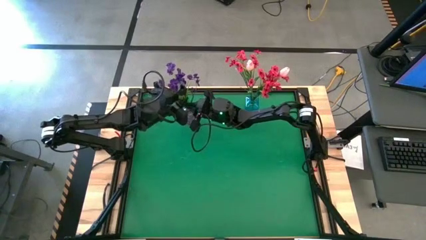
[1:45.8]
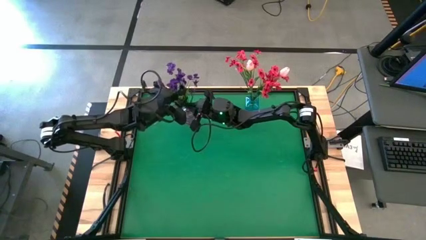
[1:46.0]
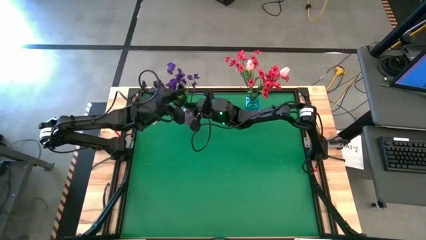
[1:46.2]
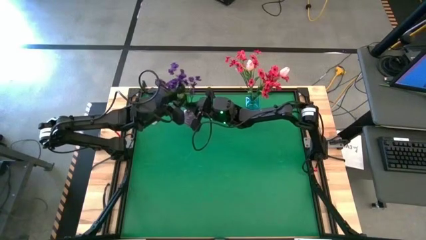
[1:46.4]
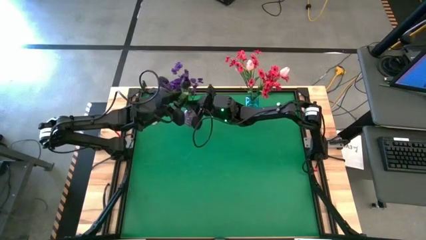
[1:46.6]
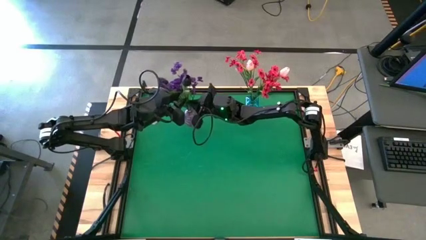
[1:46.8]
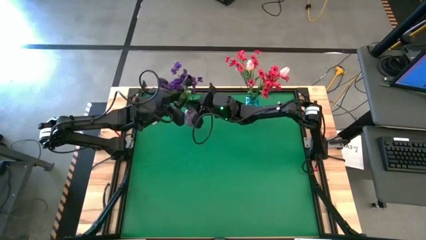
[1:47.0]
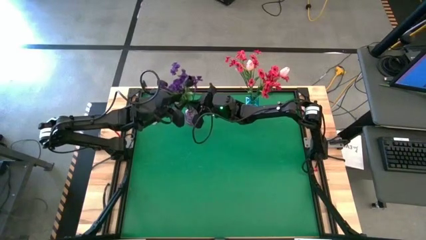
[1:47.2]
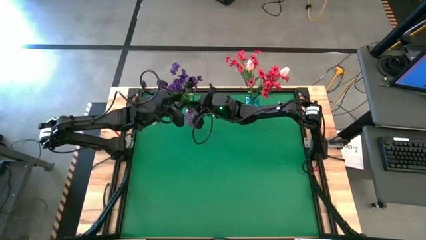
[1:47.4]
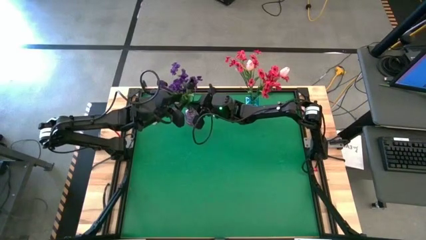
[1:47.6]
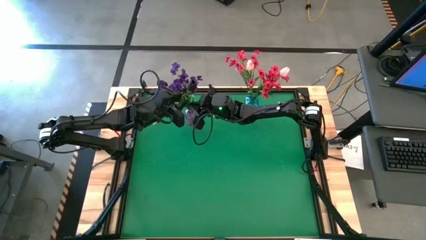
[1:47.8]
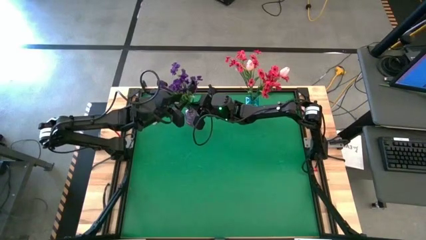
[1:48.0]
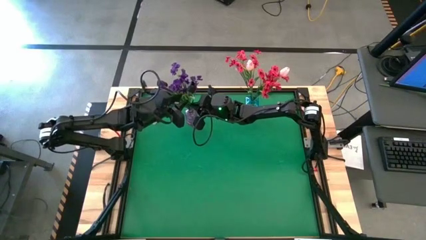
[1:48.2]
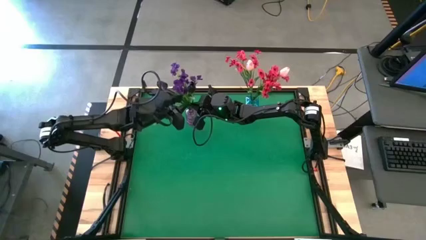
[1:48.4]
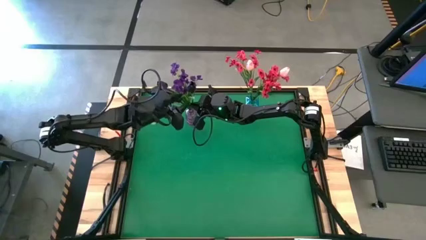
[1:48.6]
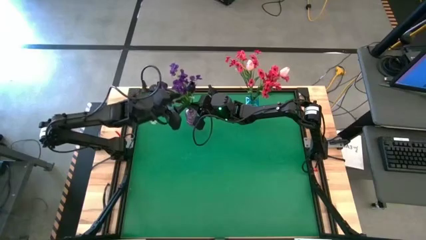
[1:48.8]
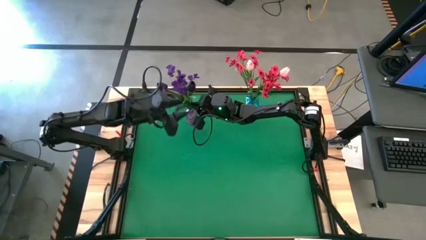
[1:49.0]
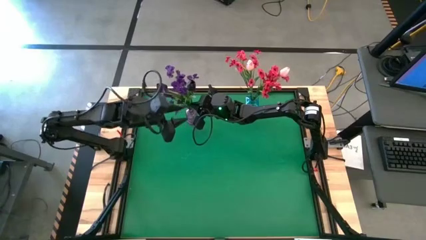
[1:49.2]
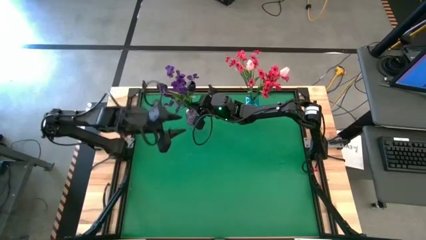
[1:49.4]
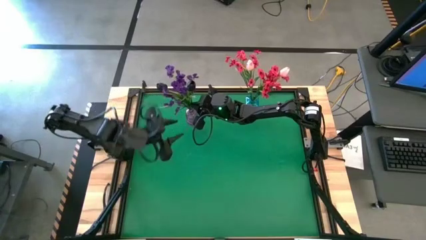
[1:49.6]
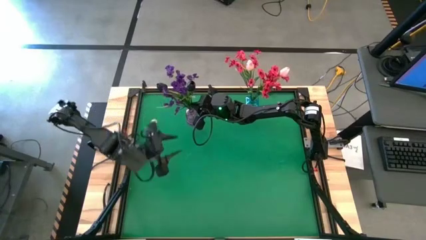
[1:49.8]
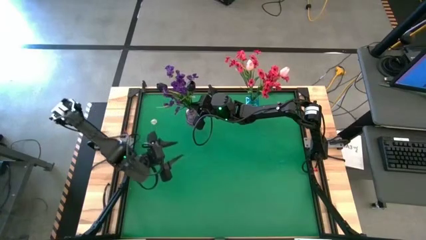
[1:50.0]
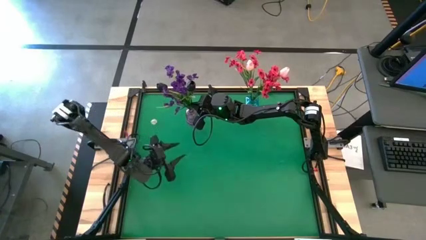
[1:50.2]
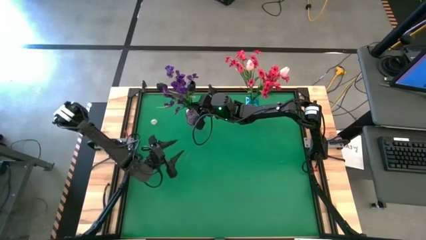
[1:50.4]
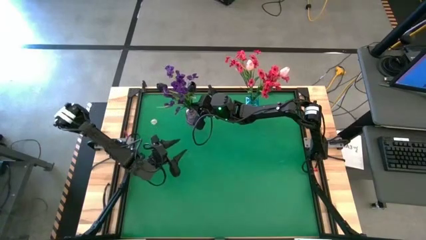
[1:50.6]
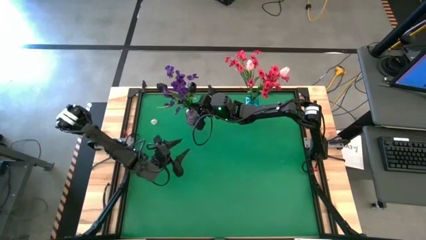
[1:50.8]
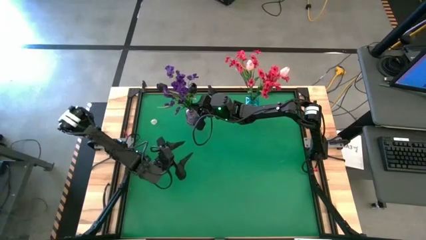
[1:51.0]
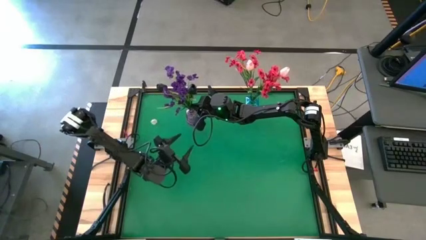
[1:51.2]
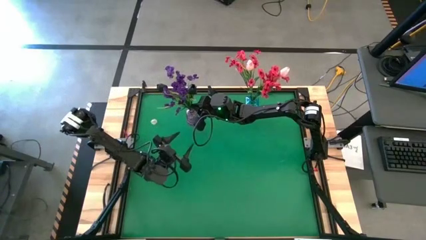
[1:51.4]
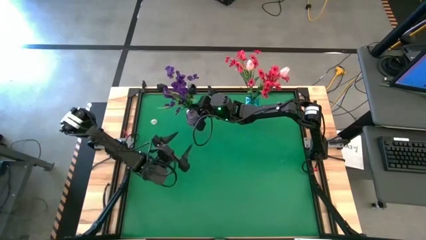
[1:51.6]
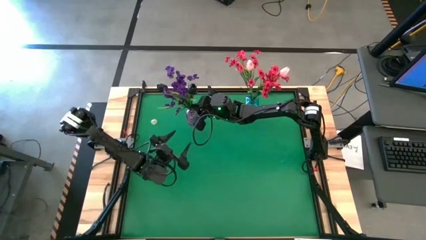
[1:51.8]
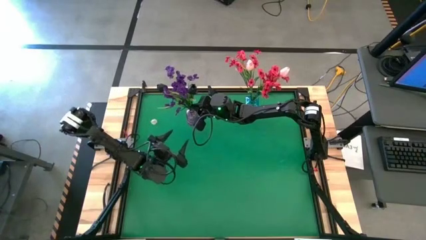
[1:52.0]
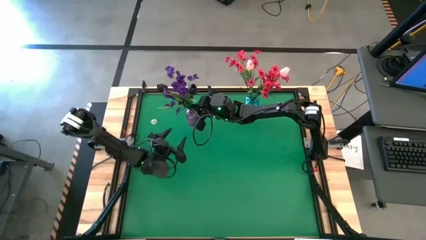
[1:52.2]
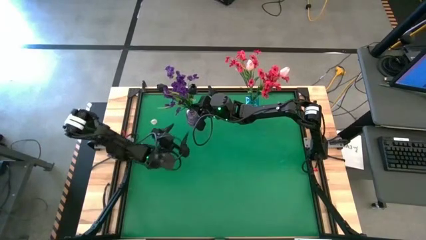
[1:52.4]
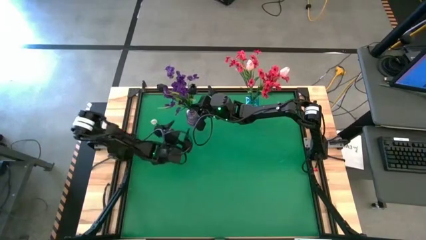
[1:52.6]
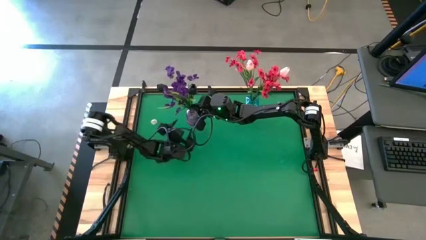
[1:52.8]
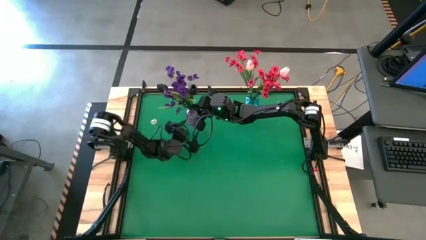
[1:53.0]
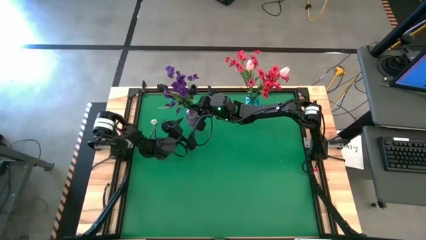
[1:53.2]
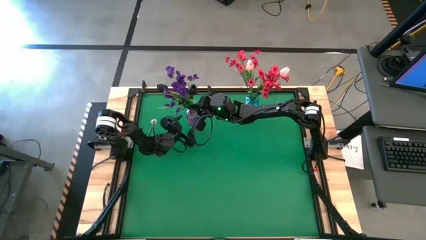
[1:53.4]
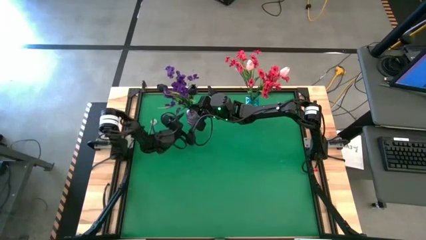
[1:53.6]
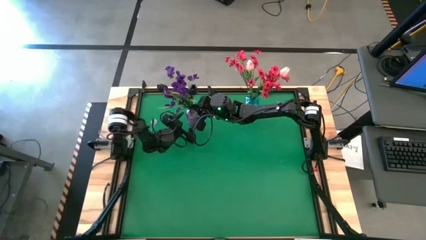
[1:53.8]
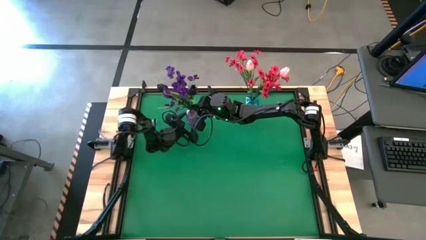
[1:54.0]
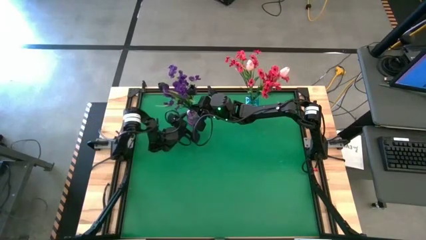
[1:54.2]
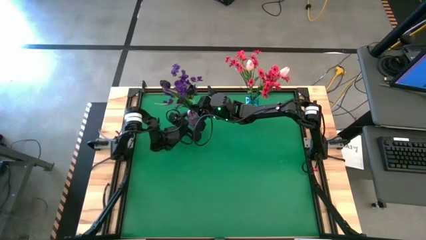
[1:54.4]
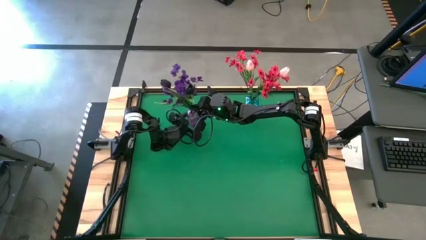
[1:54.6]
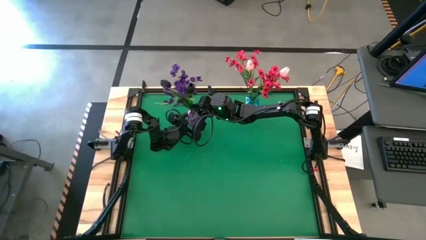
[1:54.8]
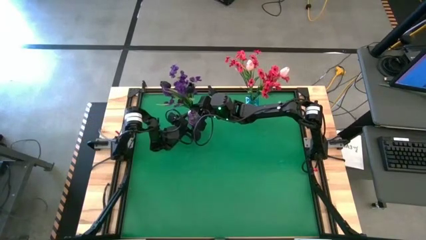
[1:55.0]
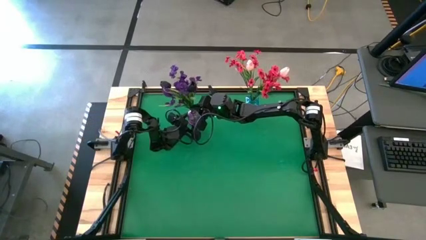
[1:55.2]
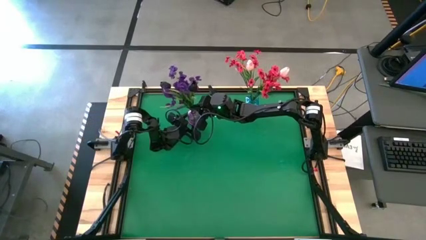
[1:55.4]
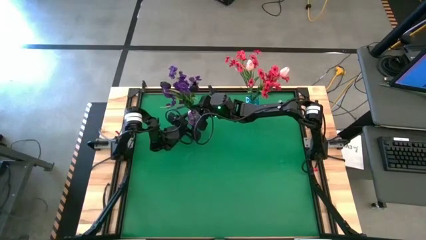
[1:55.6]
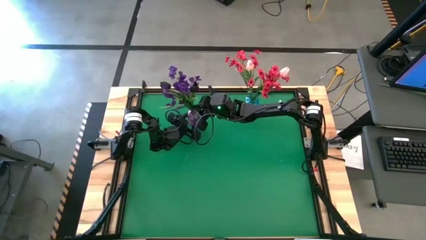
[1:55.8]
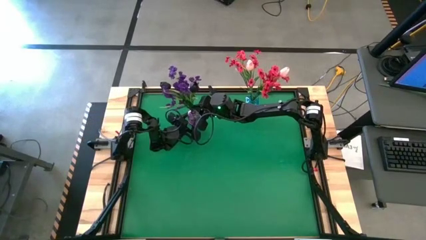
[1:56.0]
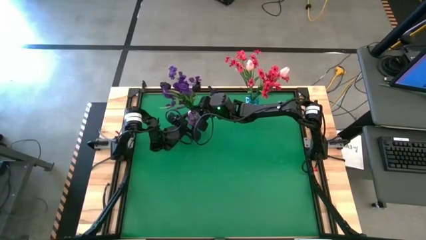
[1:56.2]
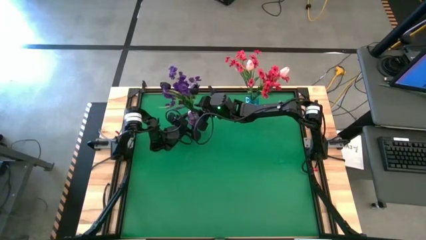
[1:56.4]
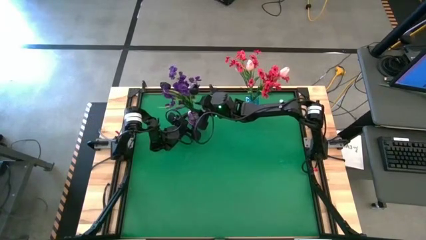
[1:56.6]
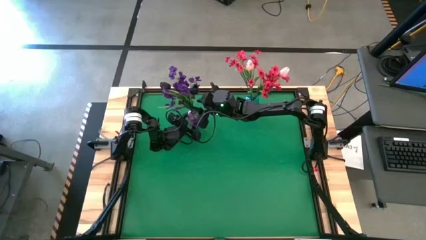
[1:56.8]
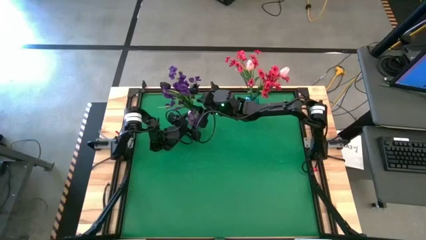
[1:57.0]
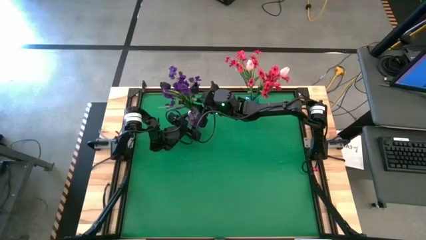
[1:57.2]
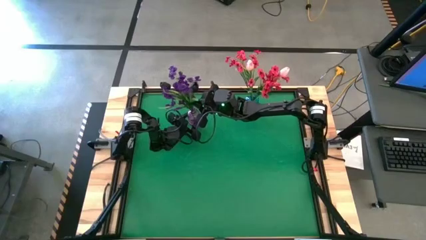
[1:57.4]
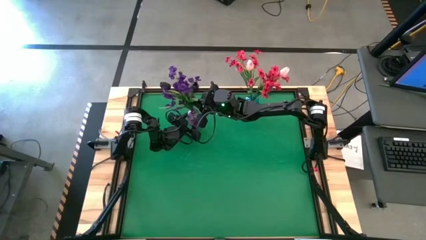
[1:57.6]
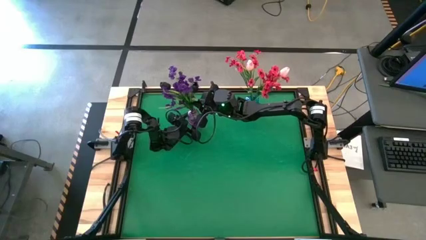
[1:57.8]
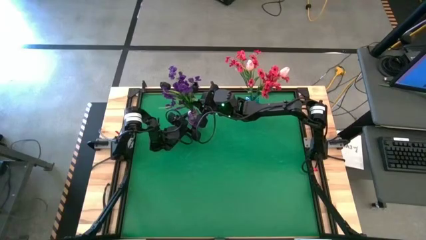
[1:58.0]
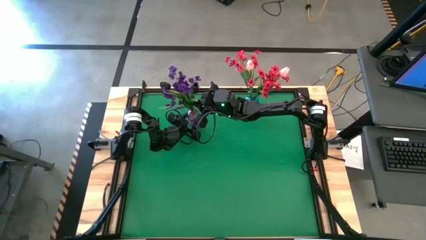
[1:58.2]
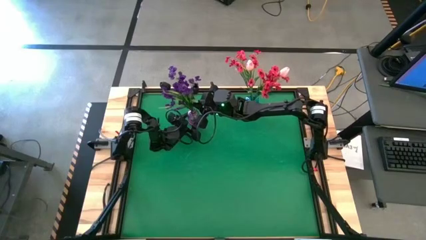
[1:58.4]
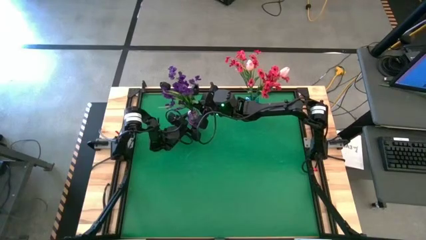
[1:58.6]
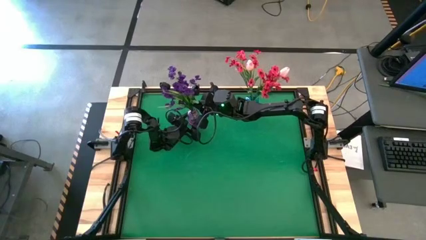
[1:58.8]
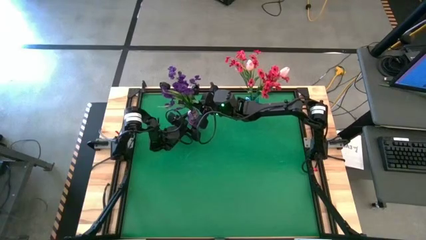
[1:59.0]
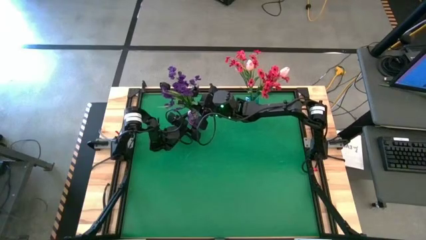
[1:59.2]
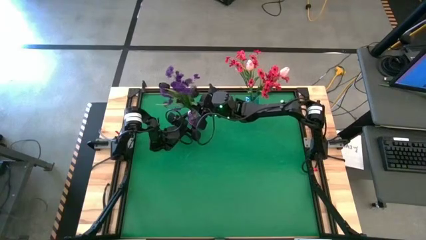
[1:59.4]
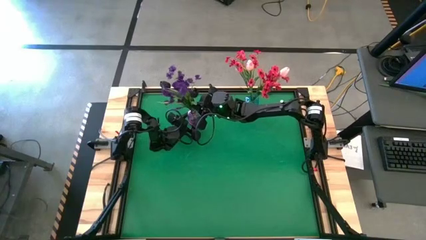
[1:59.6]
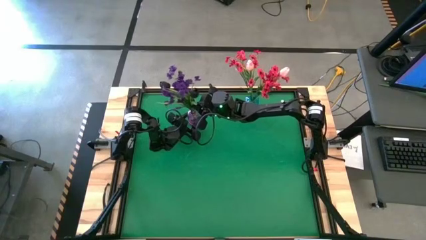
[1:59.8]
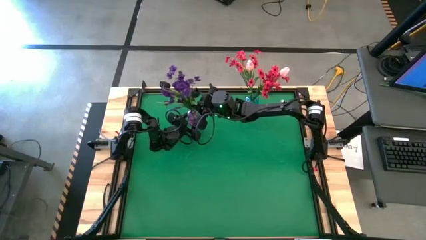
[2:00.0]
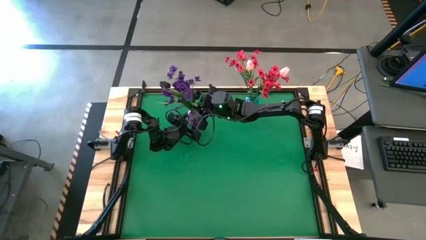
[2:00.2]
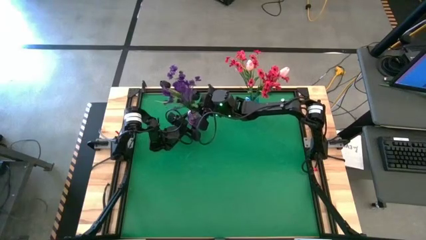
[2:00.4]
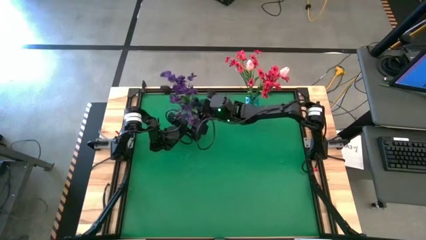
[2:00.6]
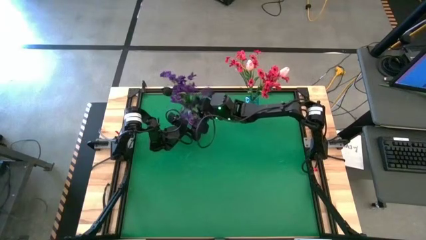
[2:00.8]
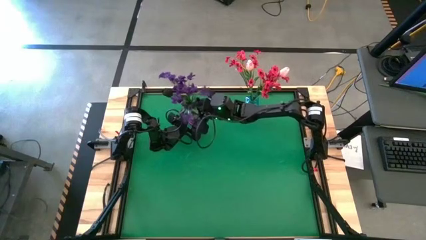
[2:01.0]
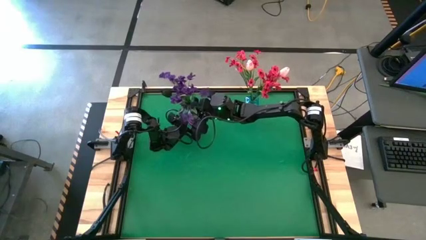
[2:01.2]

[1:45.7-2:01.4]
Task: Sort flowers into vase by color
Put the black flower into the violet vase

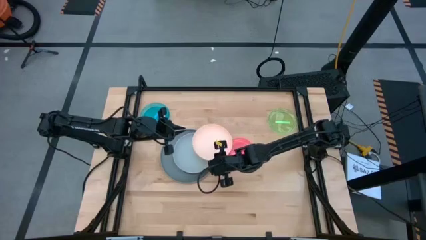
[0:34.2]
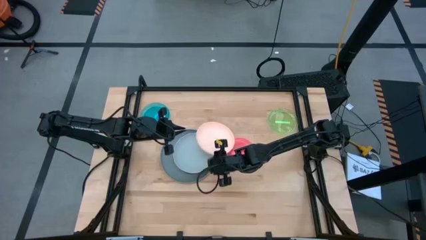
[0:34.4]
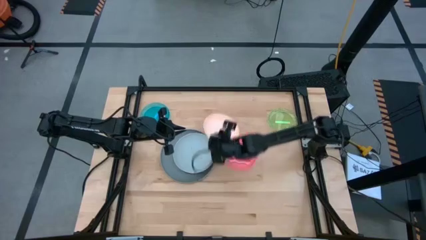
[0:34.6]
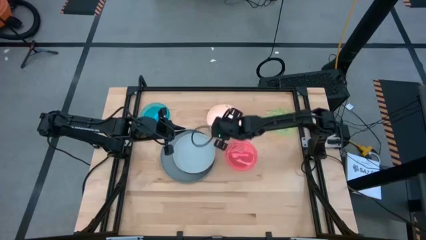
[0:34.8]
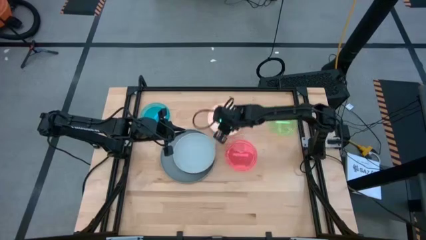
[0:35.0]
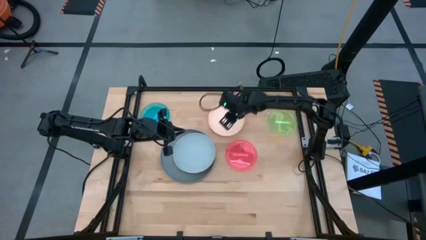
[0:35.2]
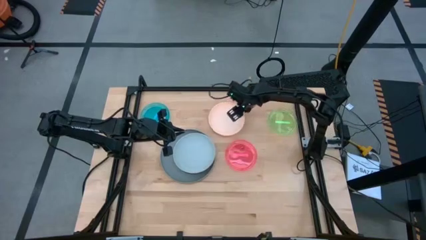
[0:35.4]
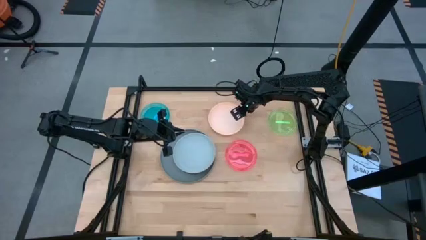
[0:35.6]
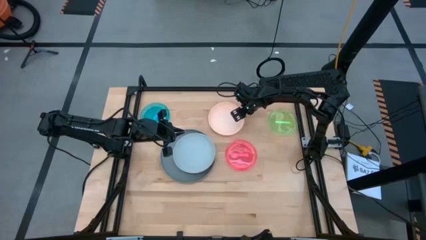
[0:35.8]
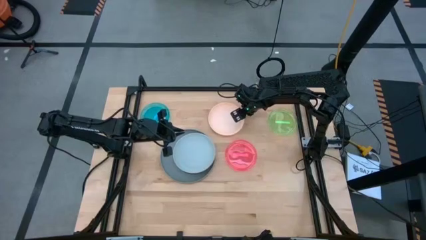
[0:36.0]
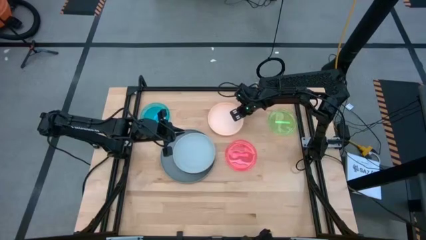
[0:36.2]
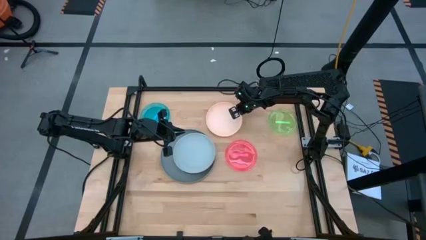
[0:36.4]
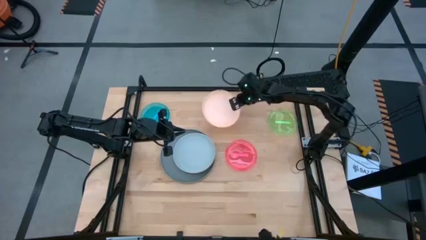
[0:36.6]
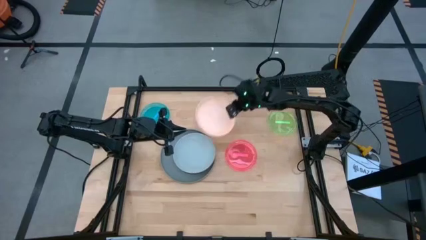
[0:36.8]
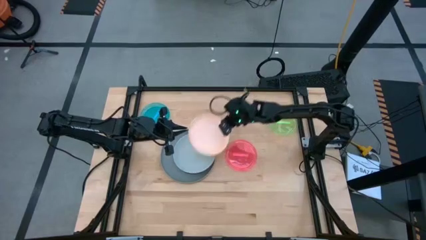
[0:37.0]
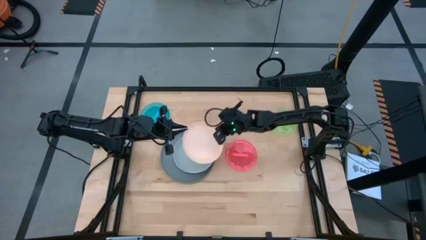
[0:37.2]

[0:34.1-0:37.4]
Task: Stack plastic plates
Stack the light pink plate on top of the light blue plate
